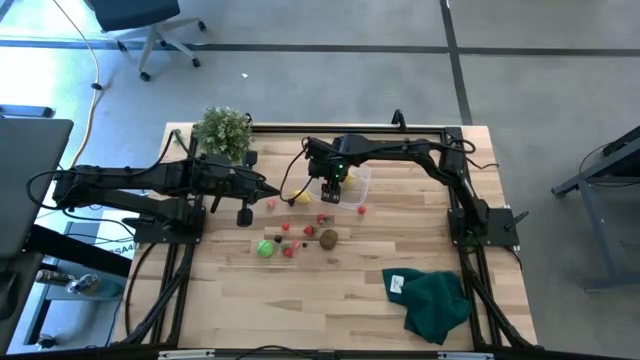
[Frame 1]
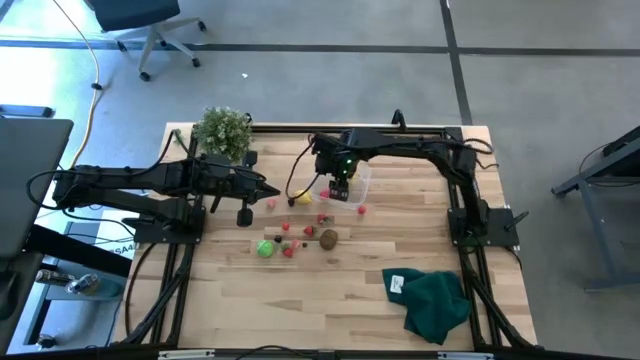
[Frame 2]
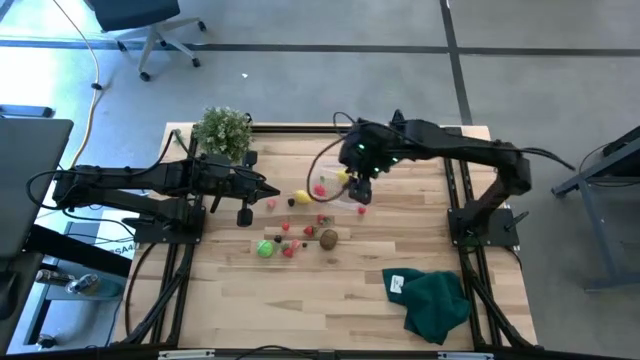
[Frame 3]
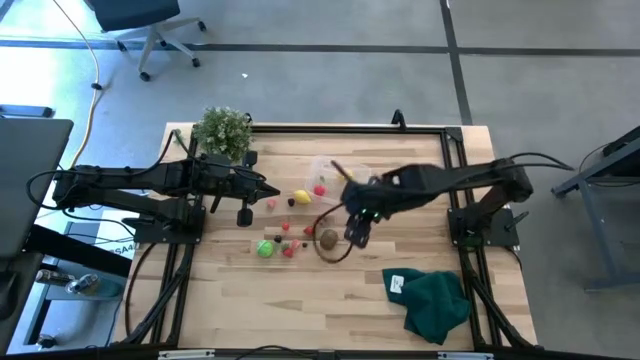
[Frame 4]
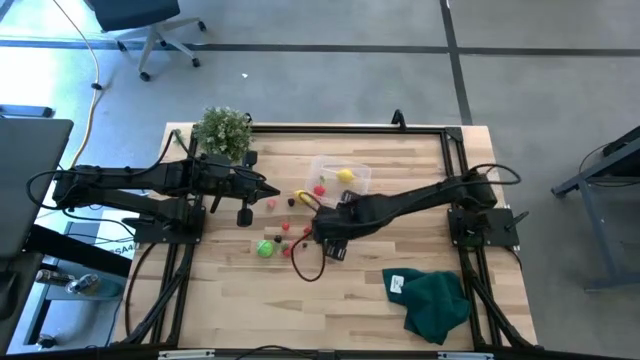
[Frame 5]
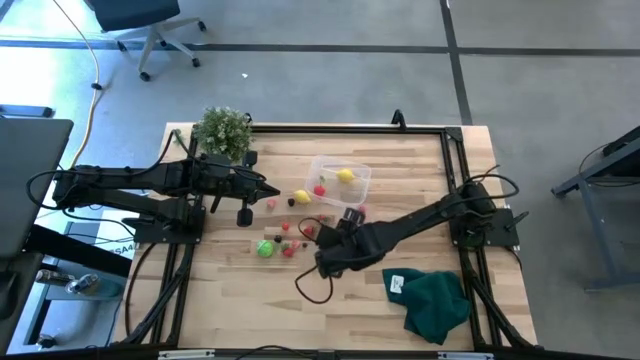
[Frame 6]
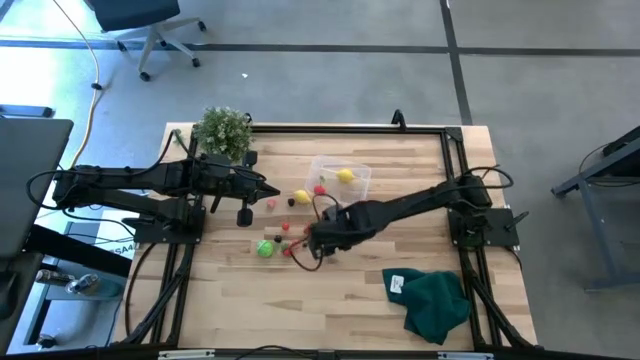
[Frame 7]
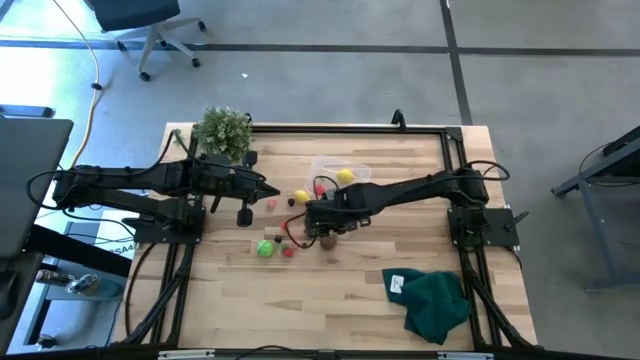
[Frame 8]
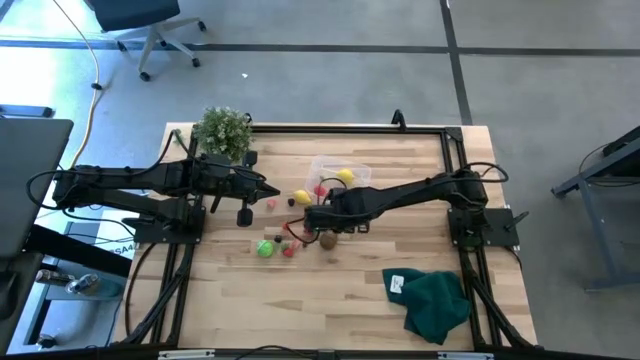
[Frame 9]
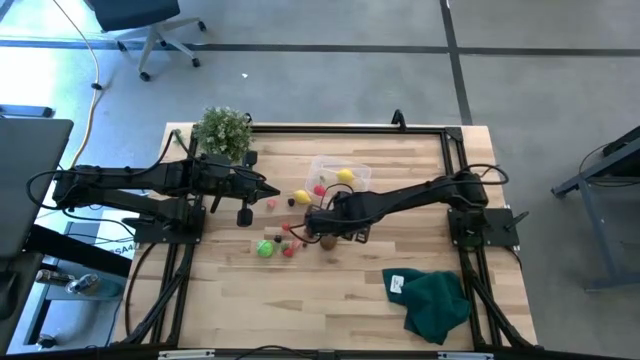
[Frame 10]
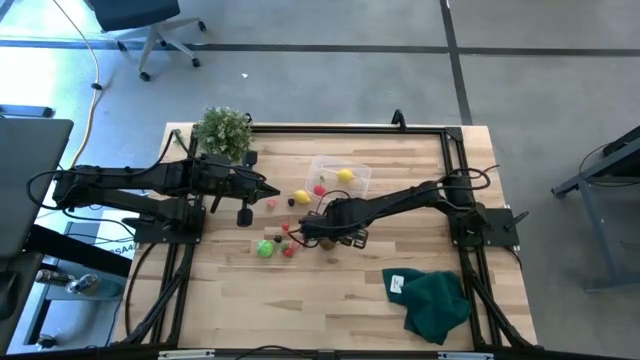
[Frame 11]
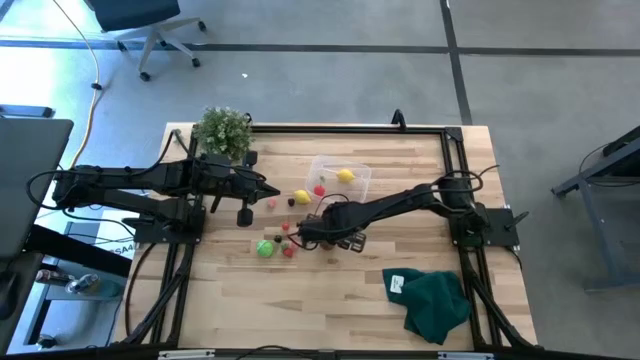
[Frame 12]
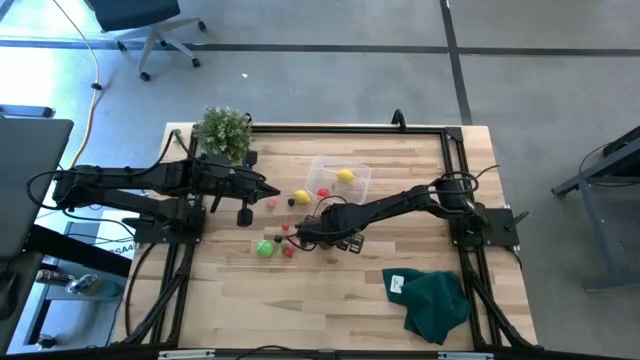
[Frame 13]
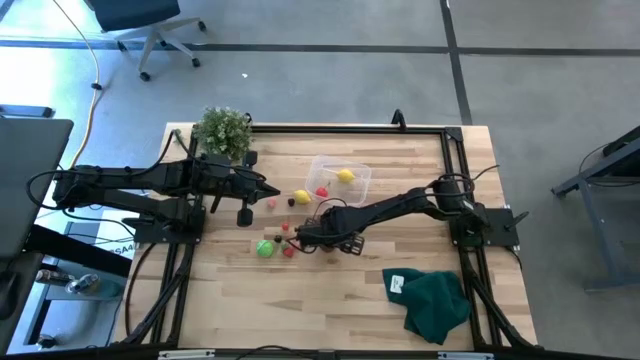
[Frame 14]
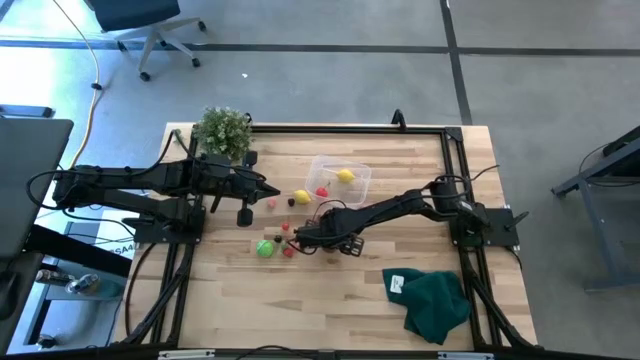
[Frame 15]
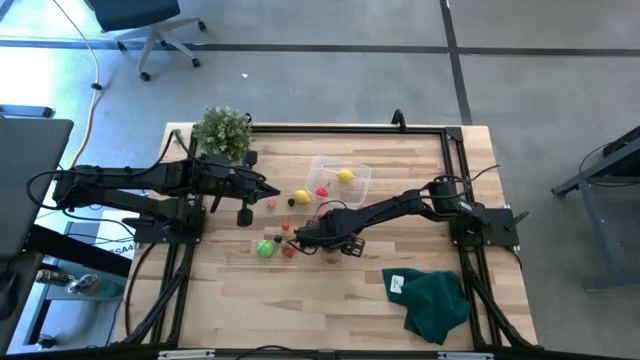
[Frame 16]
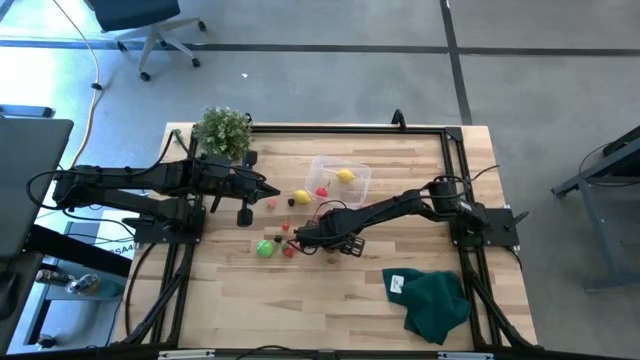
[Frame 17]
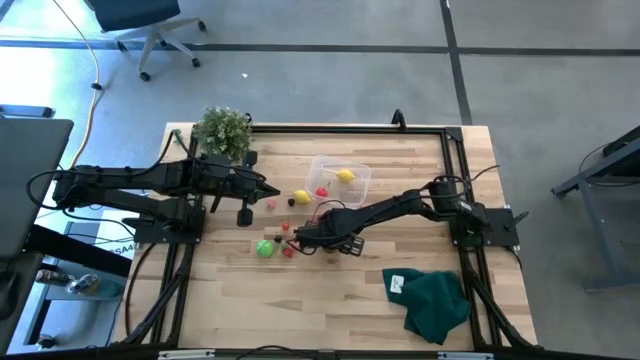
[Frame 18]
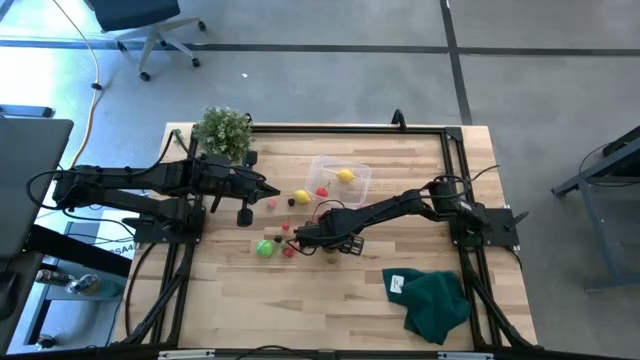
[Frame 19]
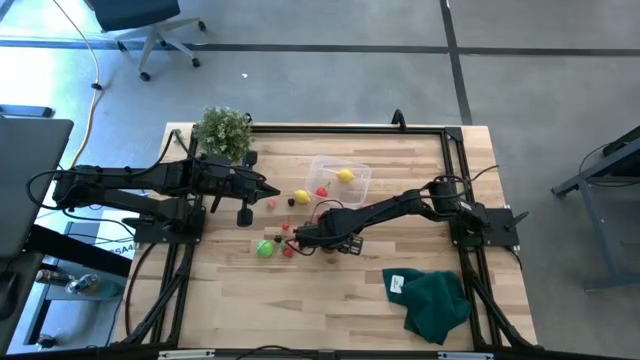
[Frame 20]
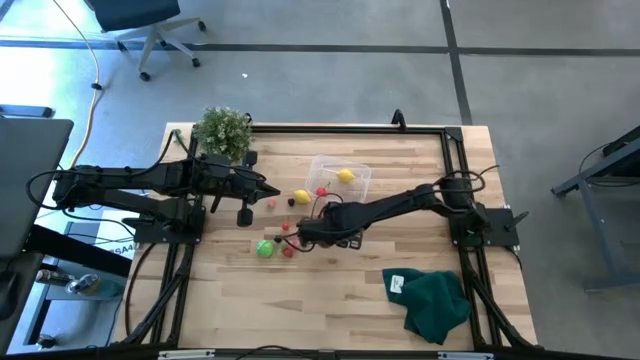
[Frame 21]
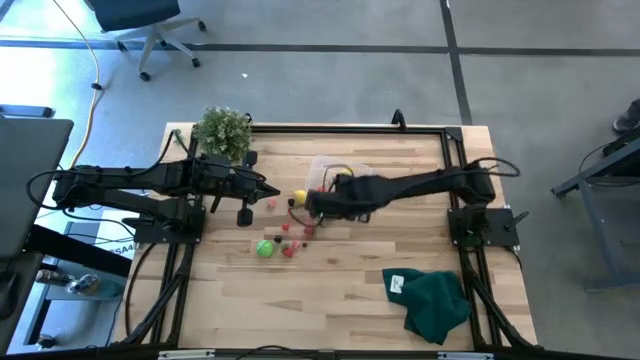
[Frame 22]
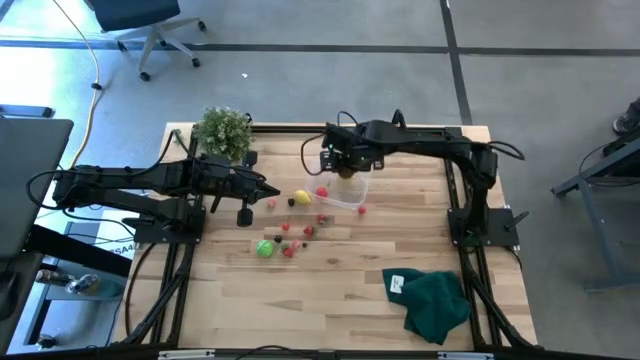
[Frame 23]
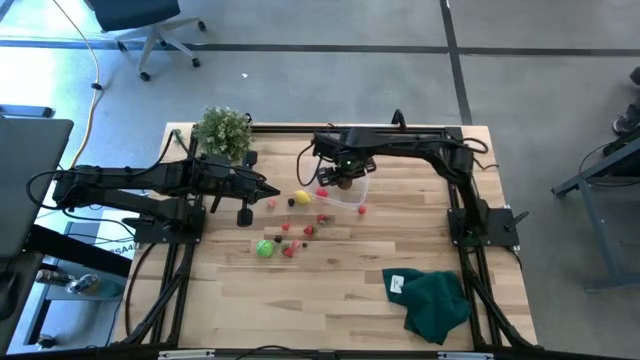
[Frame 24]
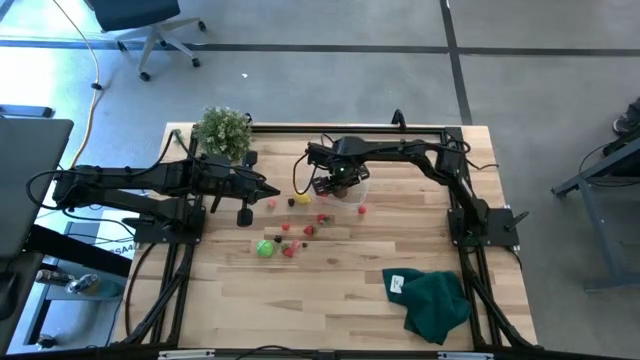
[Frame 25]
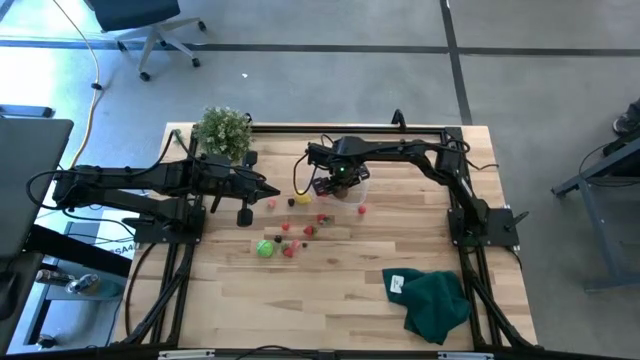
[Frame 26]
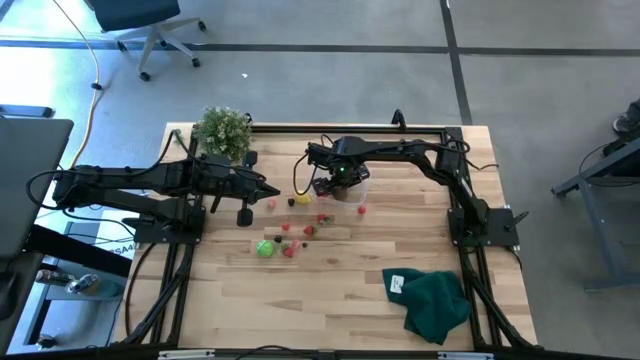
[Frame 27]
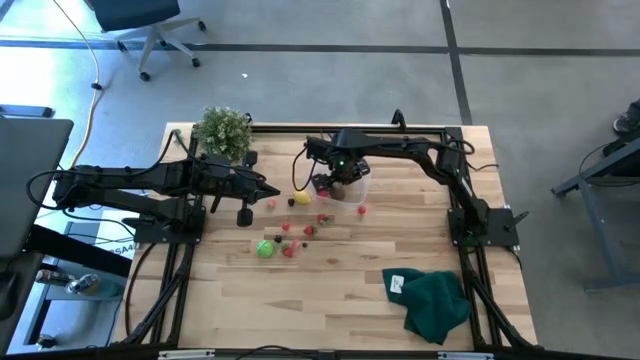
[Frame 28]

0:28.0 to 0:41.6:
Task: Pick and placing Produce into tupperware
Put the brown kiwi into the transparent bin

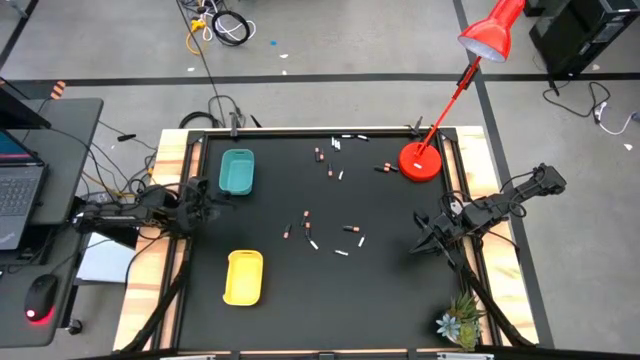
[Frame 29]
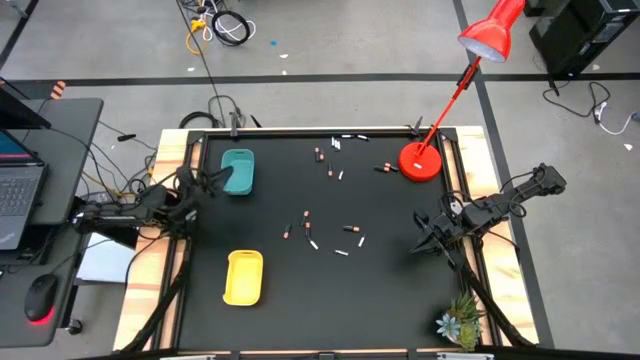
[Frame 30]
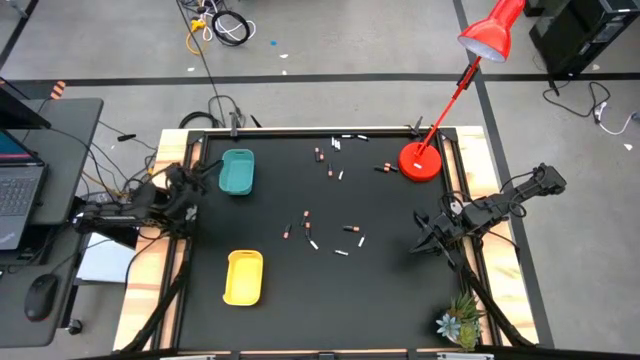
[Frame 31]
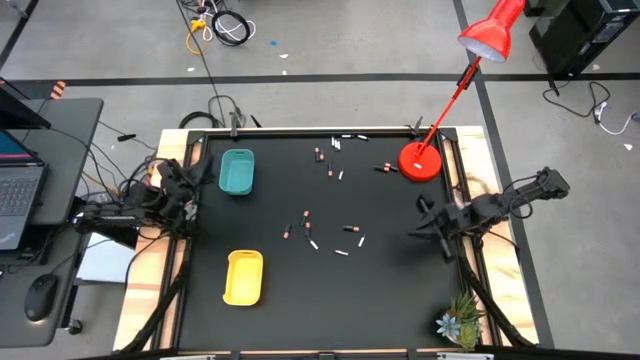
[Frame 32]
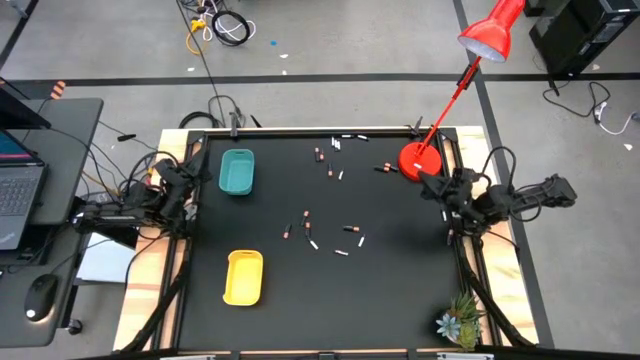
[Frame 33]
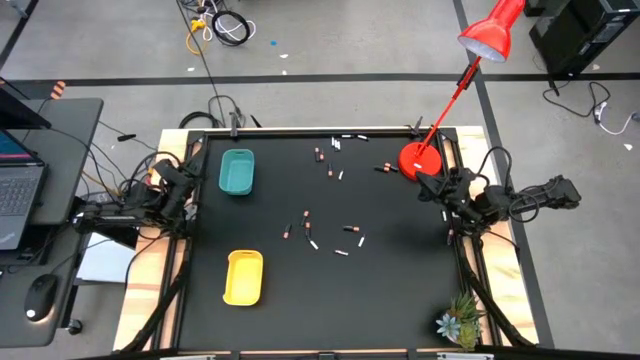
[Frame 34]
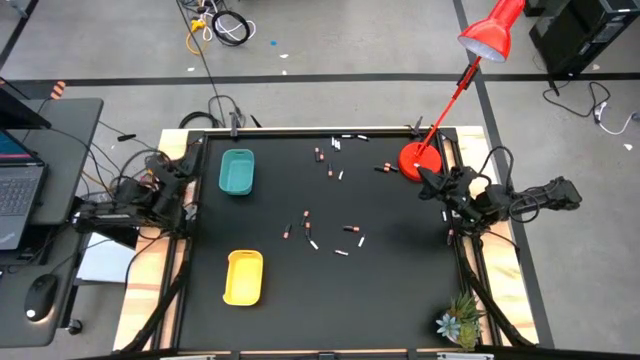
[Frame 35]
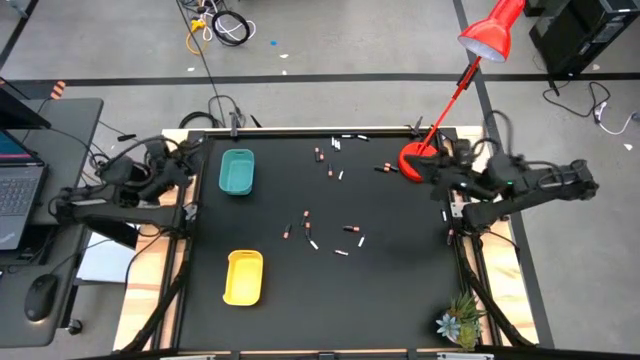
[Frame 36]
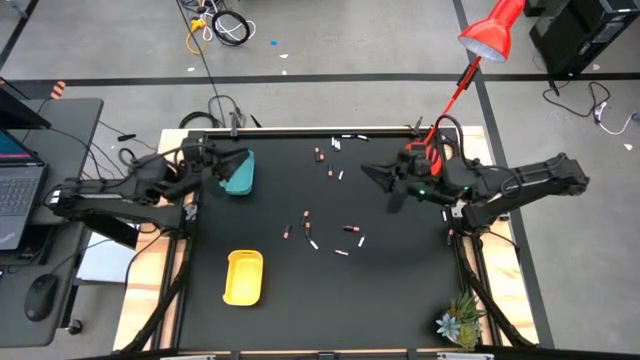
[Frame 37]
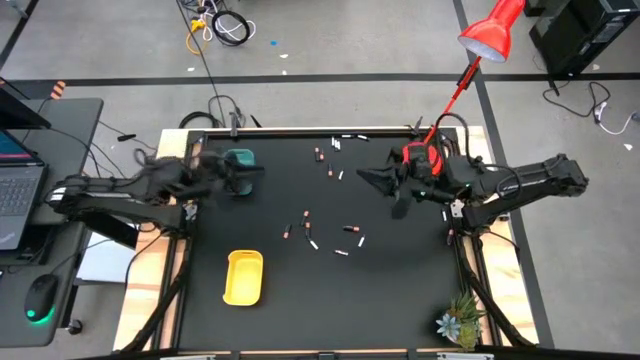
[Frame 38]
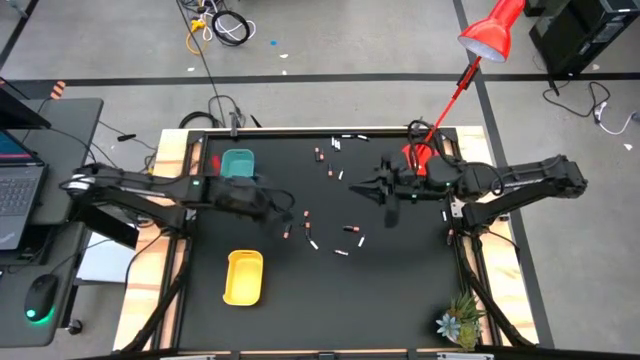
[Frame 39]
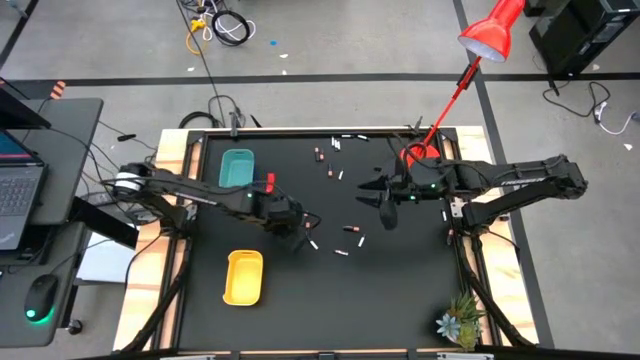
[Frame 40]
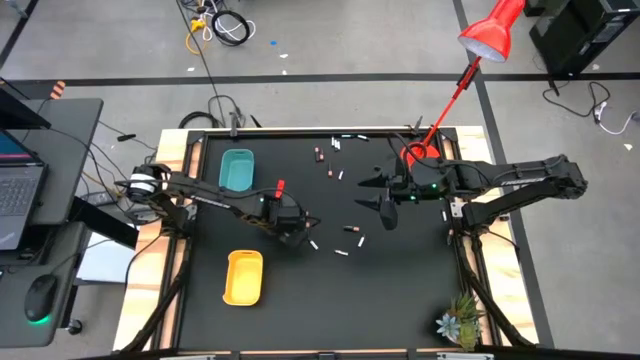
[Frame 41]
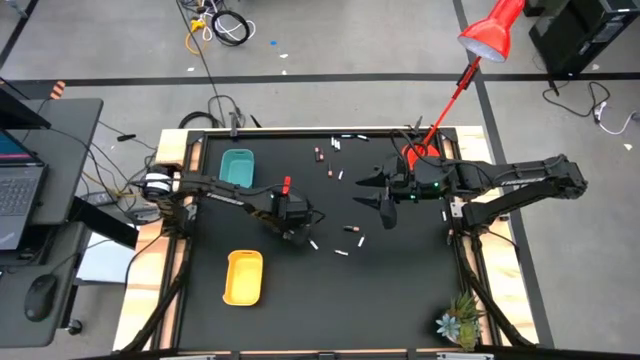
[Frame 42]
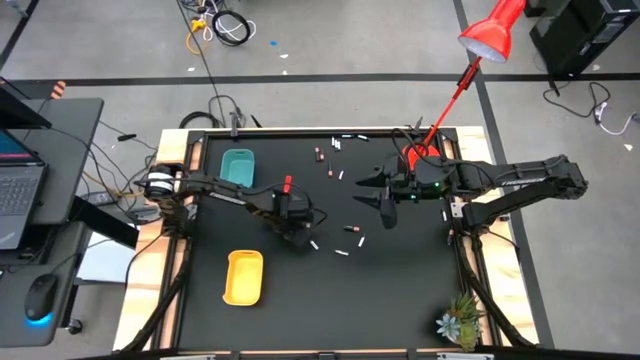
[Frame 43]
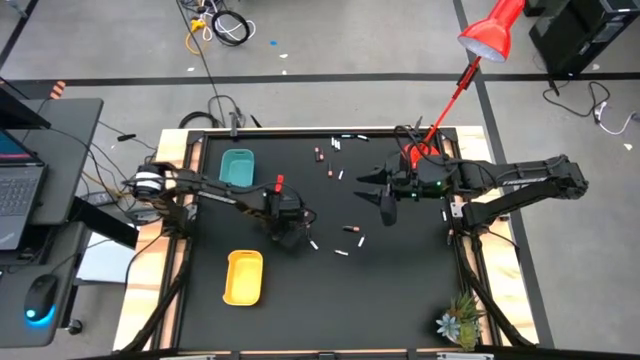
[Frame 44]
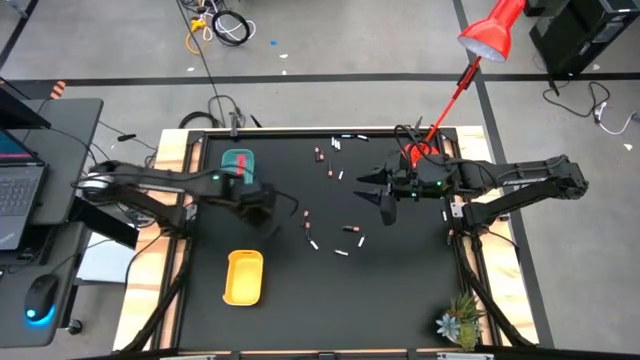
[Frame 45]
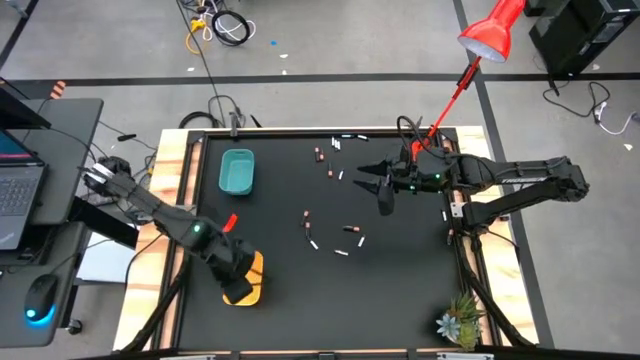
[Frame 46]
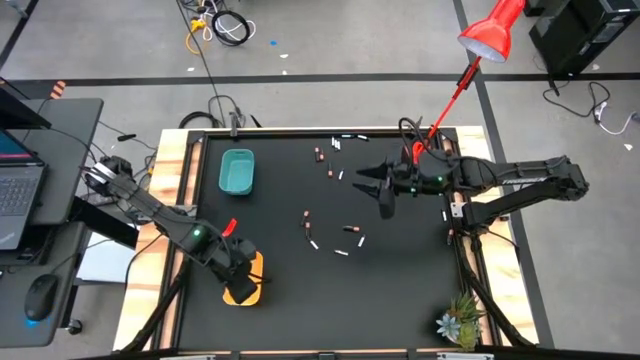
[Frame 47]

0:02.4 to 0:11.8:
Task: Sort batteries
Put the black battery into the yellow bin
